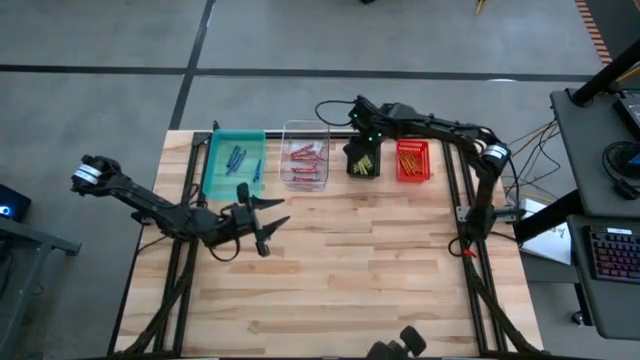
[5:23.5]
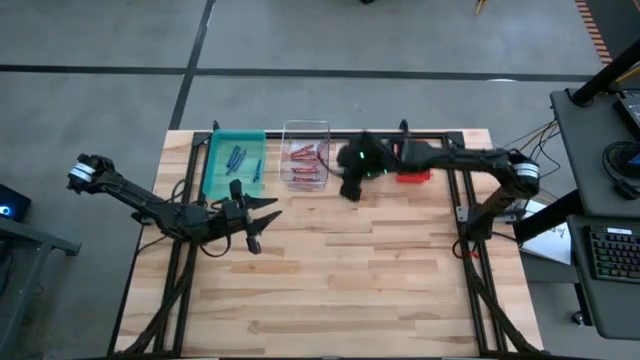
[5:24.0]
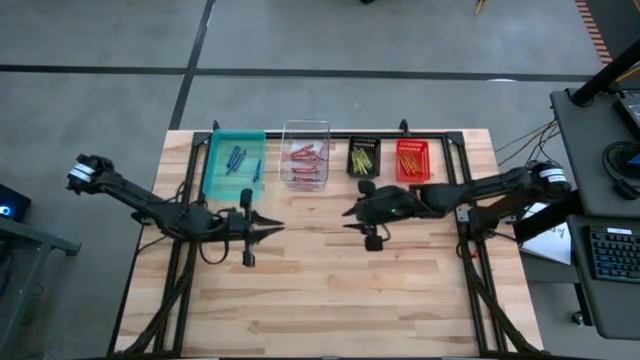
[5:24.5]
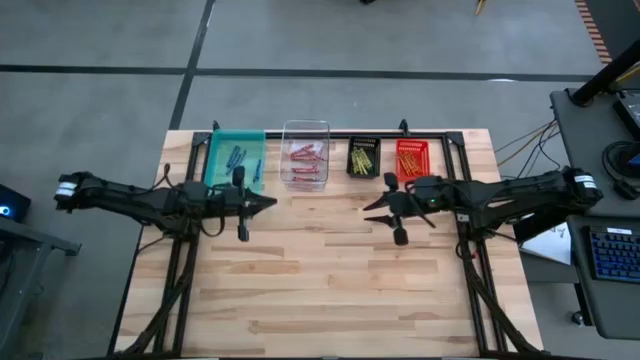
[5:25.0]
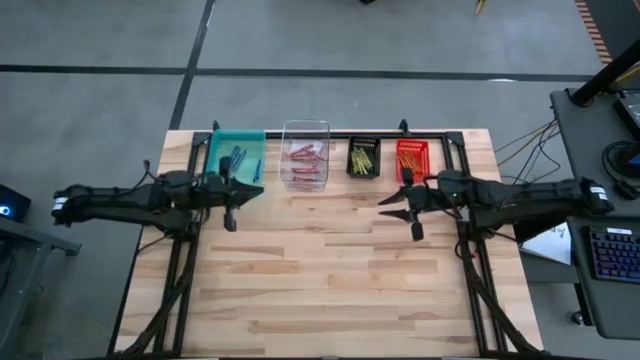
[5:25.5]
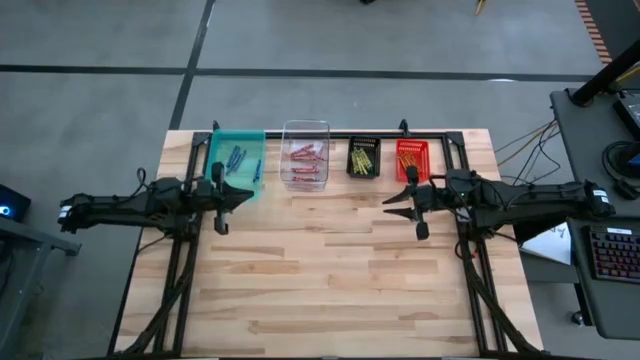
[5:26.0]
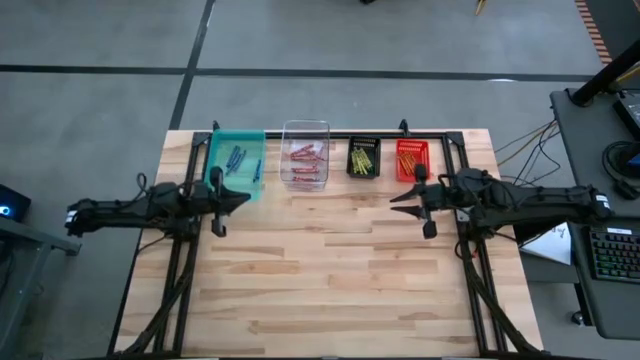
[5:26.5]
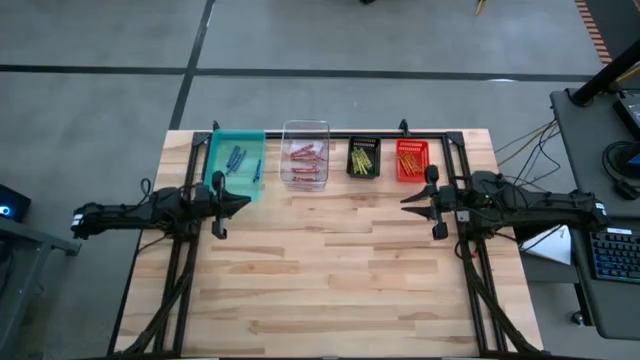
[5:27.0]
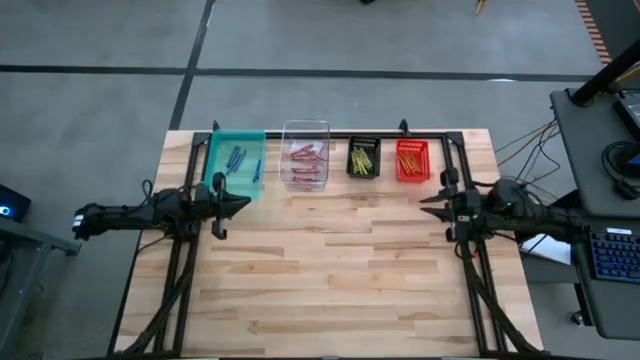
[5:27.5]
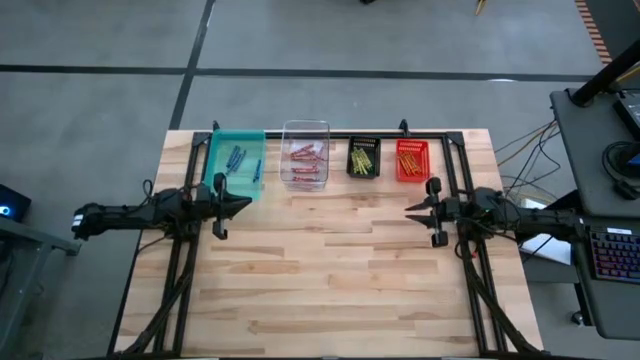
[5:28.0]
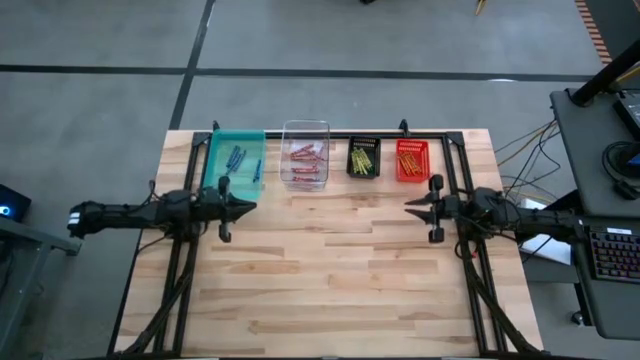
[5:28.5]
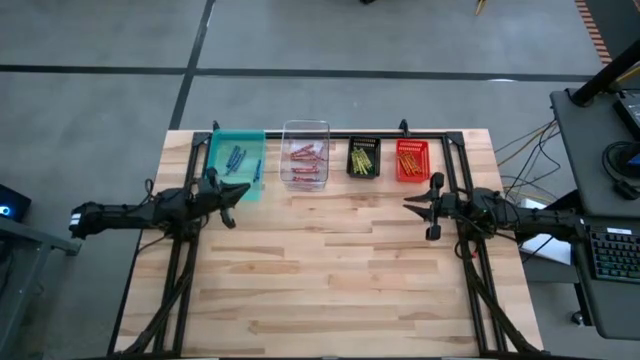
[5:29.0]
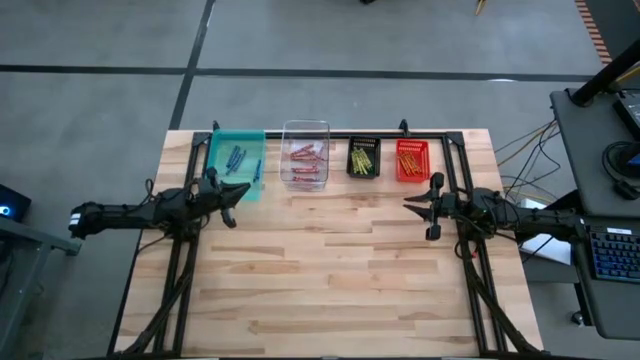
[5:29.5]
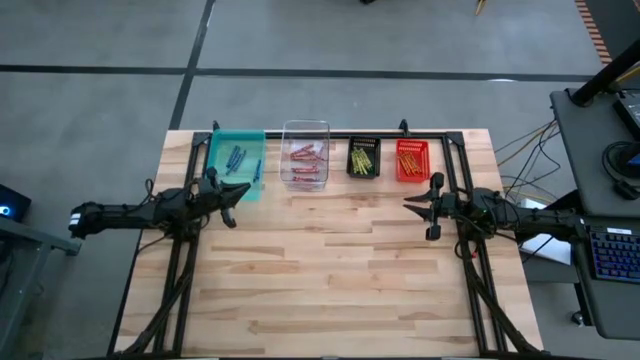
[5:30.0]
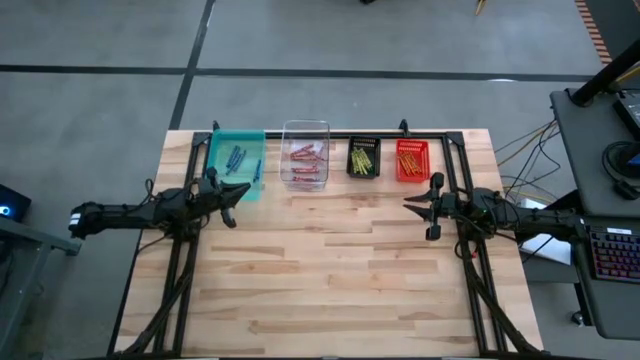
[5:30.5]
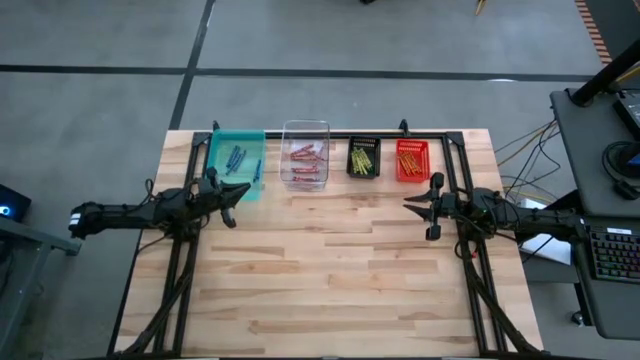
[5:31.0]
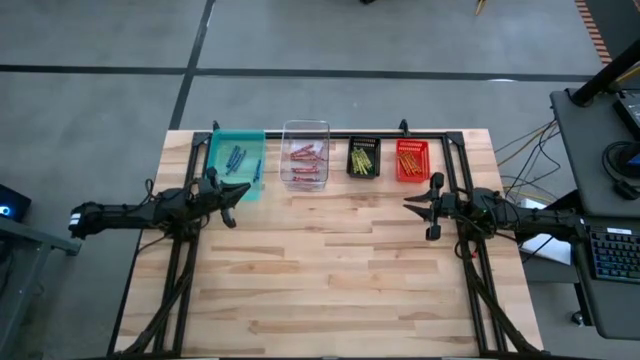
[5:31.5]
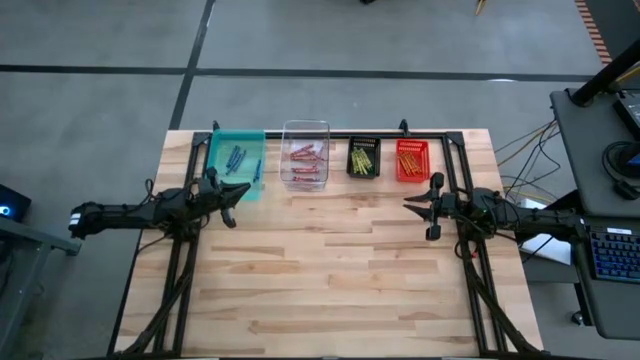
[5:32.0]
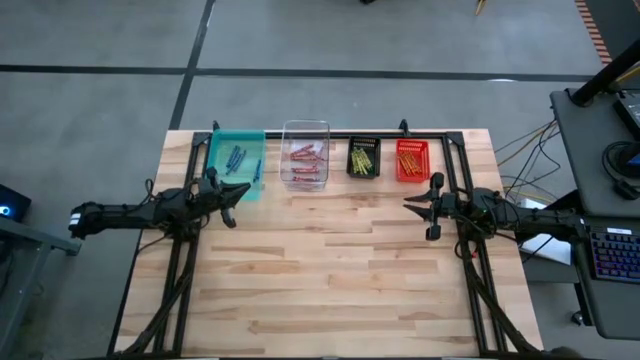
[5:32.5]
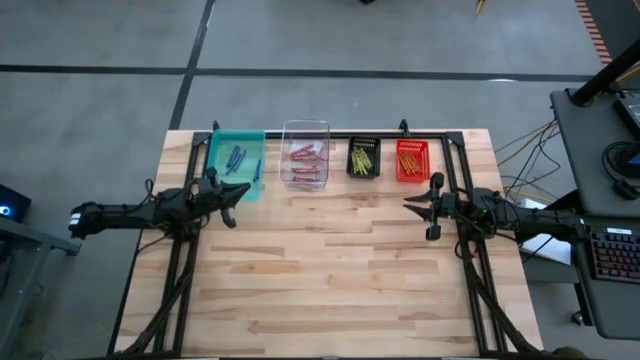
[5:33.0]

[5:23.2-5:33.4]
Task: Sort crayons
Return to Home Position

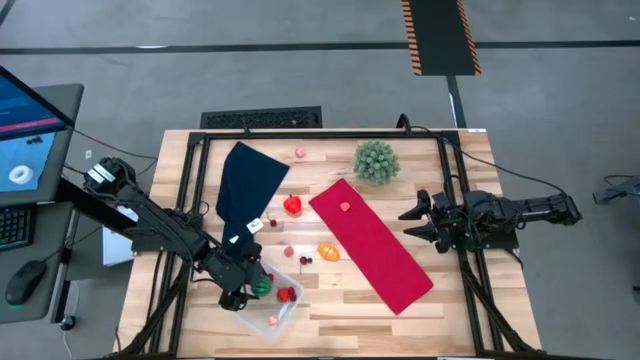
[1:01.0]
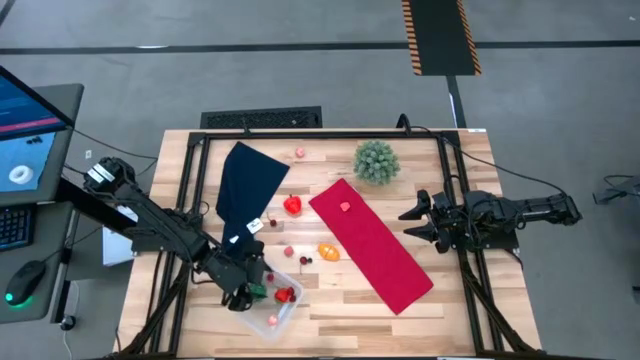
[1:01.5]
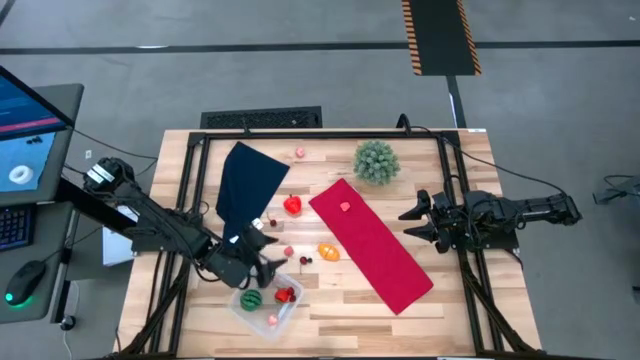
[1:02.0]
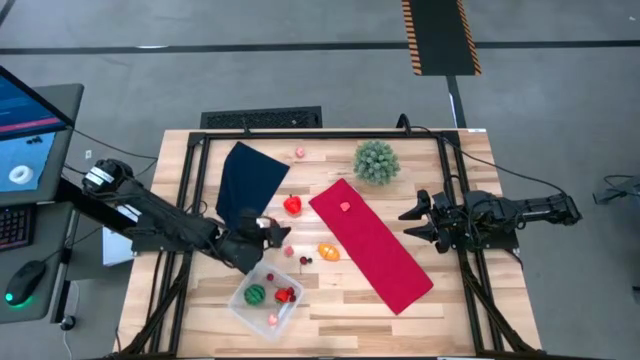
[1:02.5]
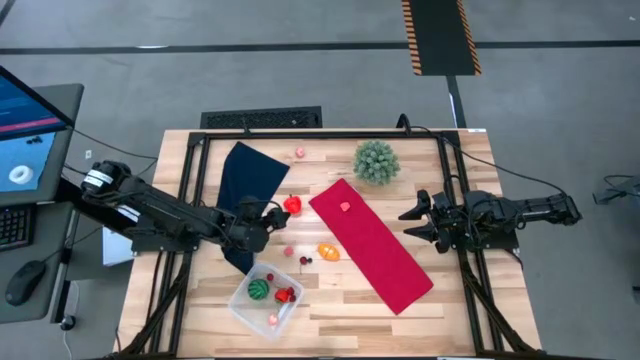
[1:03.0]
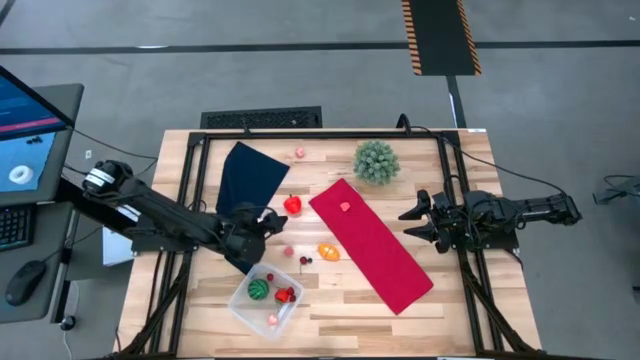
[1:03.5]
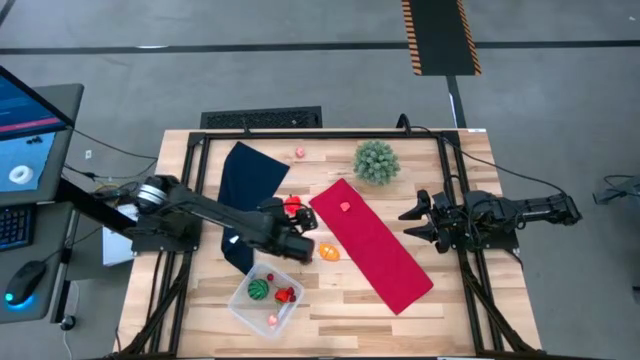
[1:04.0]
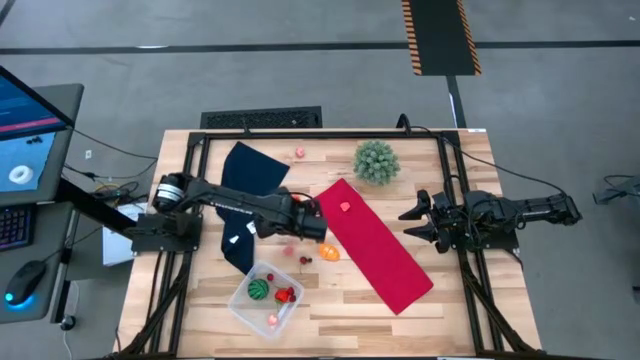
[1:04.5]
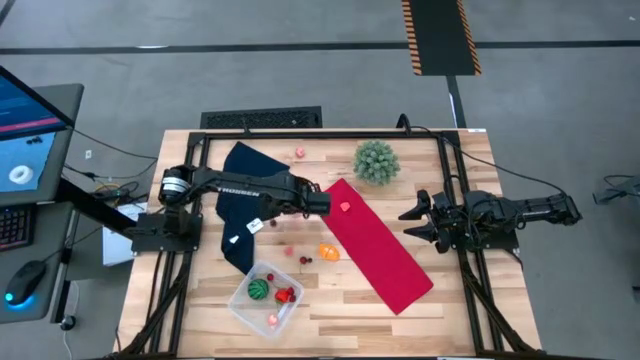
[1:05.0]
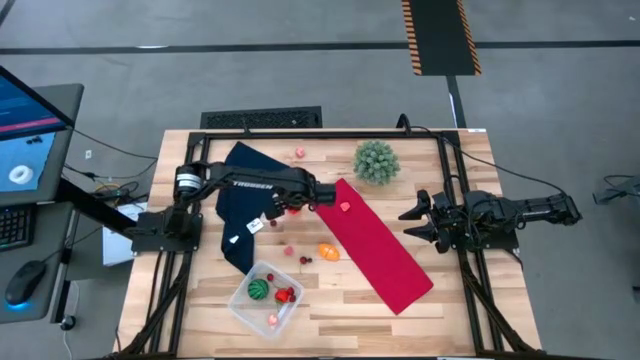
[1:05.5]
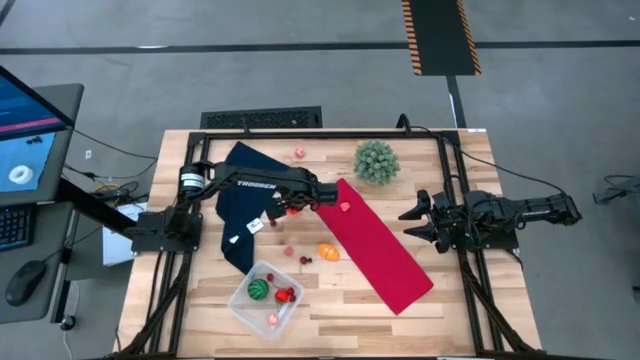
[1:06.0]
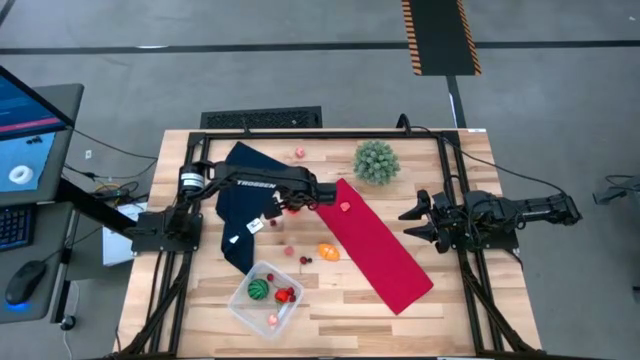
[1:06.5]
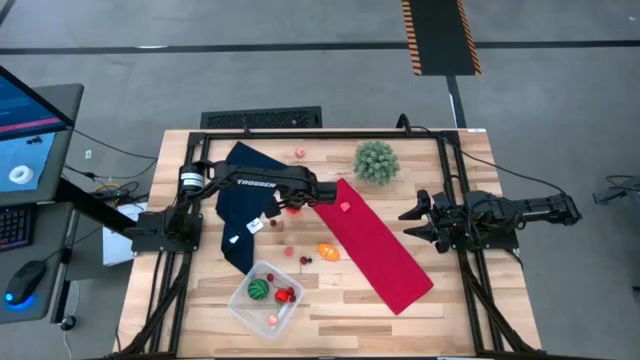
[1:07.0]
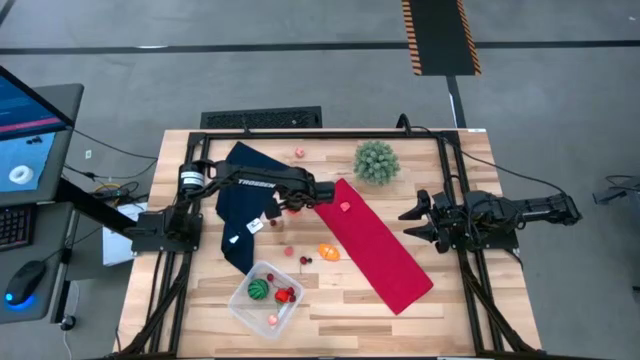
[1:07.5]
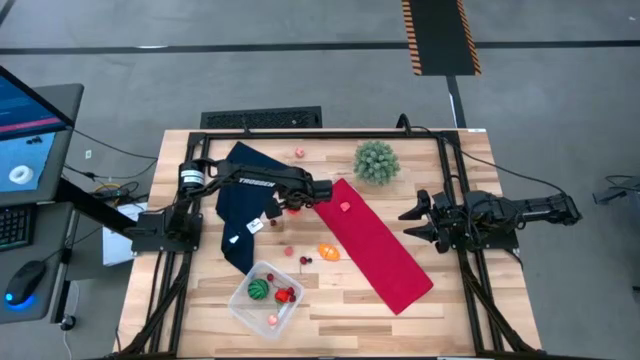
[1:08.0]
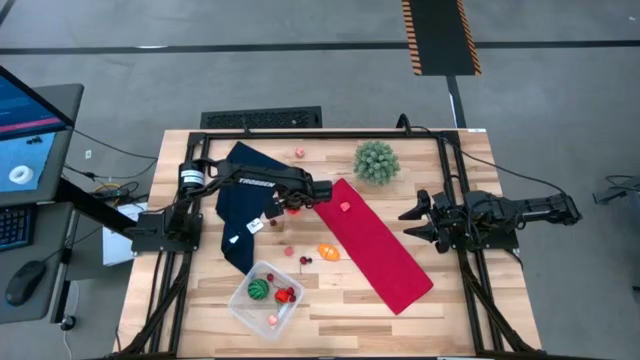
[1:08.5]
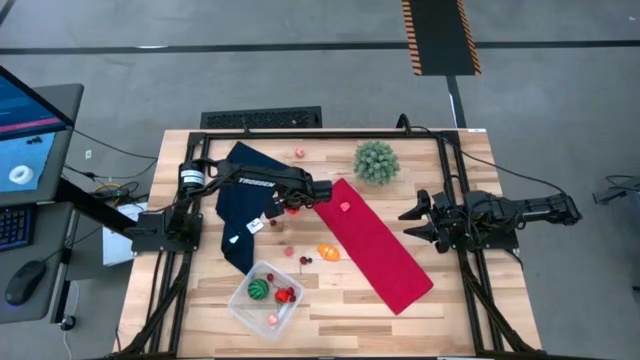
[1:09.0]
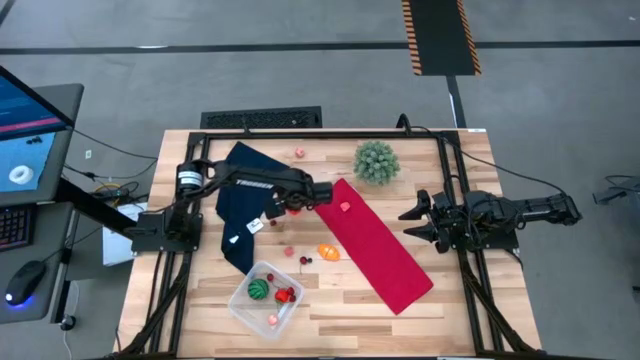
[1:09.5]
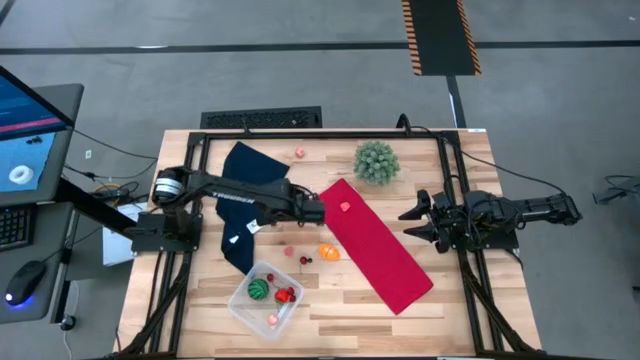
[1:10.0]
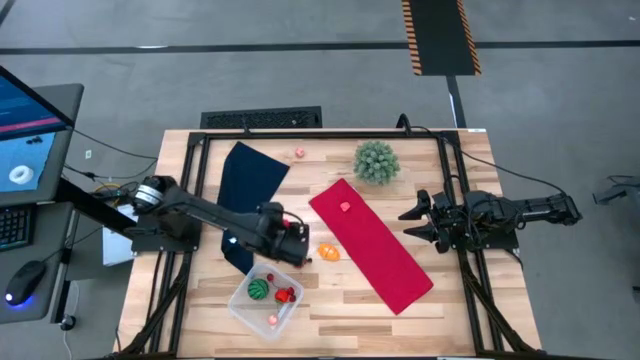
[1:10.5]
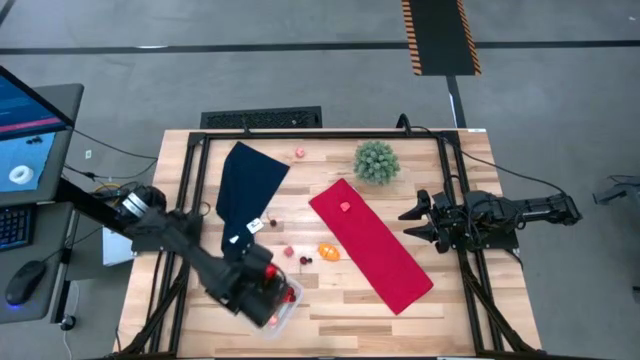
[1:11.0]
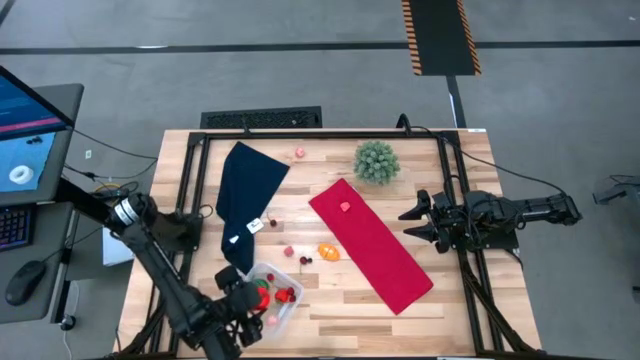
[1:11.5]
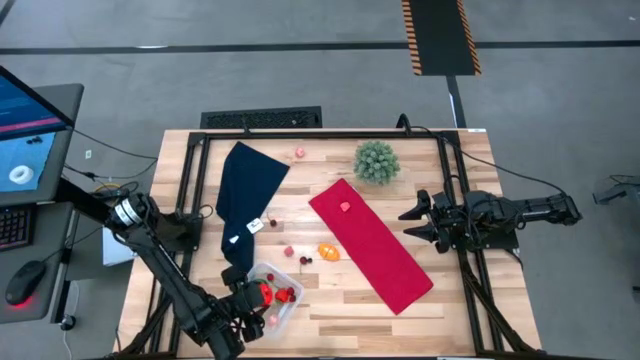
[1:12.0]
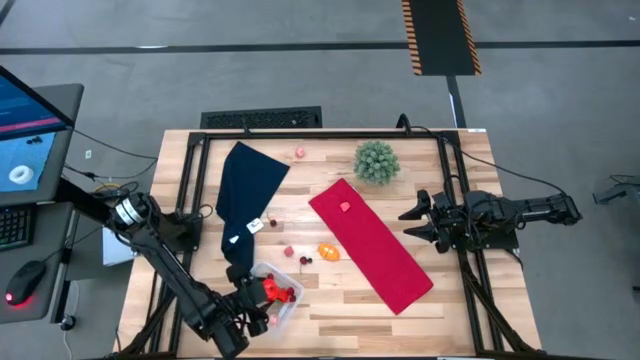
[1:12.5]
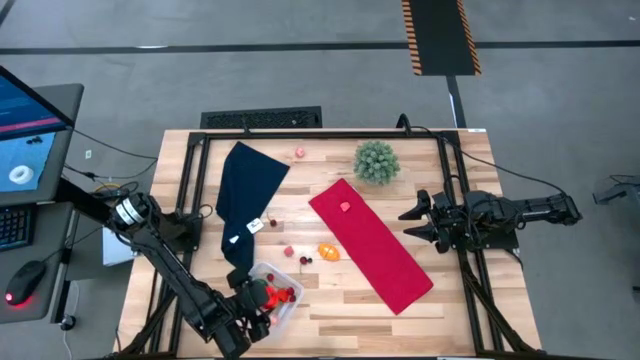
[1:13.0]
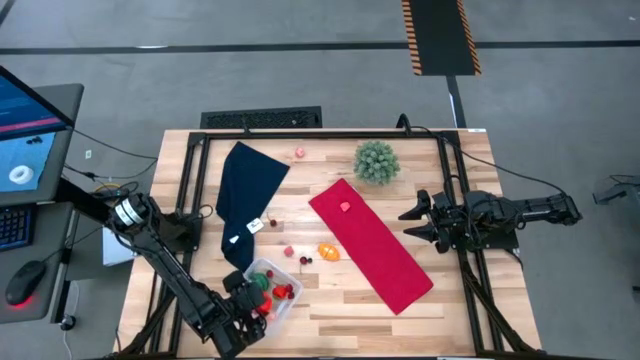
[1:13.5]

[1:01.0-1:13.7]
Task: Pick and placing Produce into tupperware
Put the apple into the transparent bin
